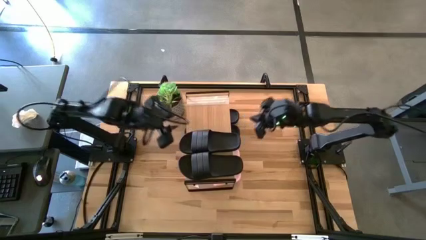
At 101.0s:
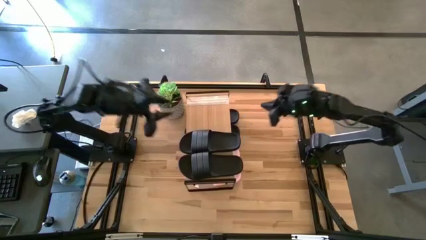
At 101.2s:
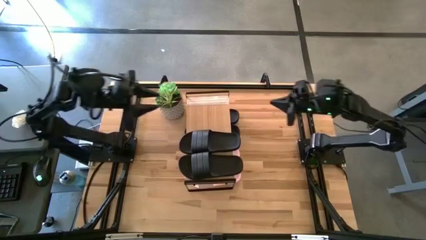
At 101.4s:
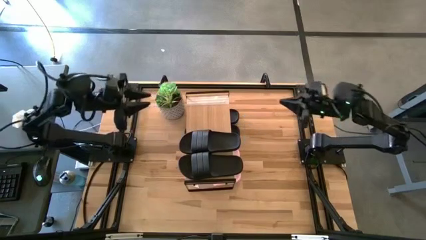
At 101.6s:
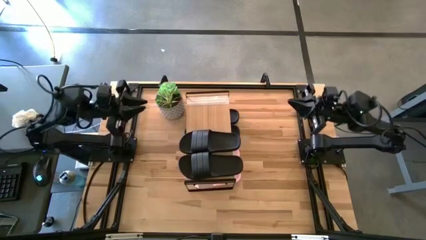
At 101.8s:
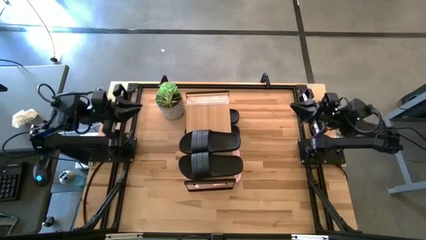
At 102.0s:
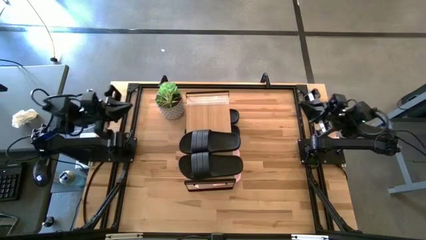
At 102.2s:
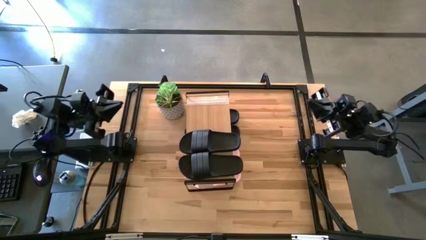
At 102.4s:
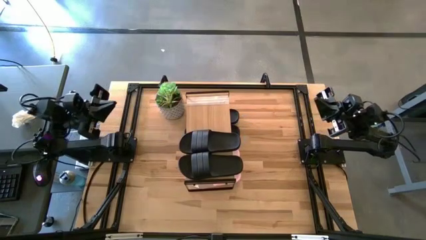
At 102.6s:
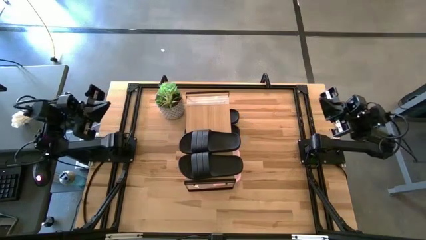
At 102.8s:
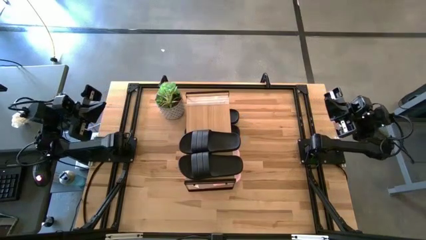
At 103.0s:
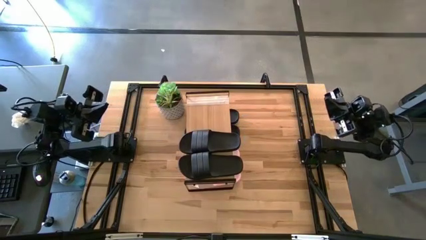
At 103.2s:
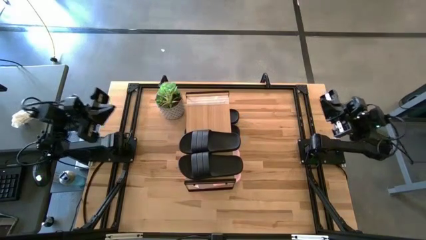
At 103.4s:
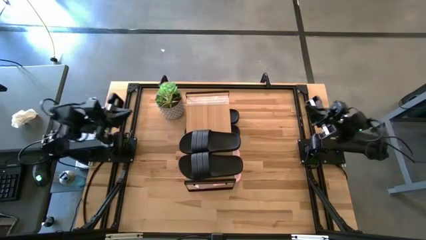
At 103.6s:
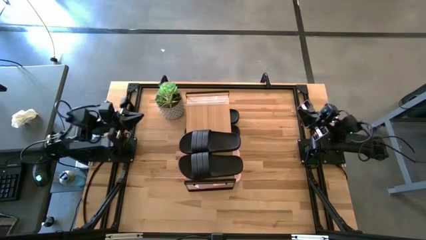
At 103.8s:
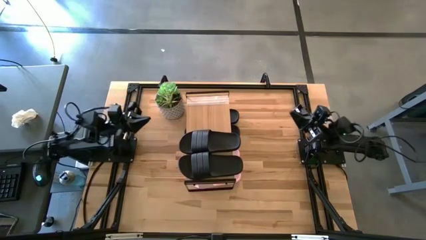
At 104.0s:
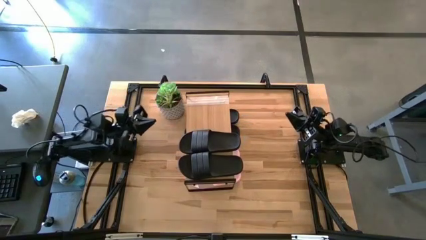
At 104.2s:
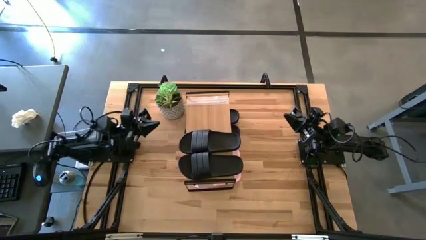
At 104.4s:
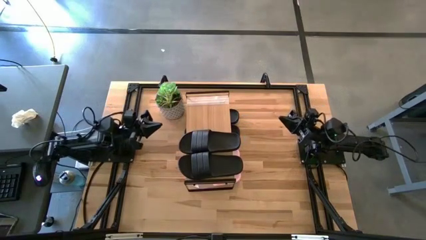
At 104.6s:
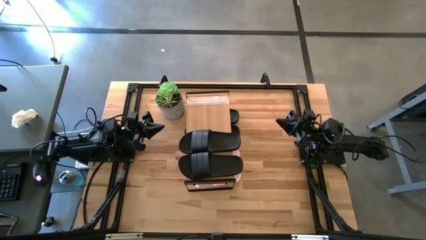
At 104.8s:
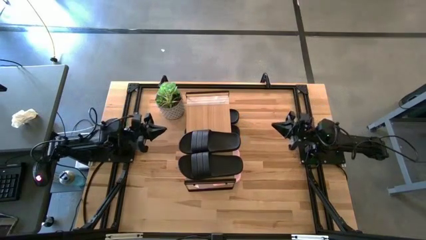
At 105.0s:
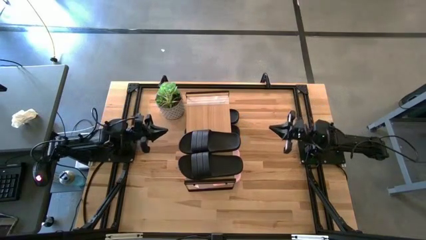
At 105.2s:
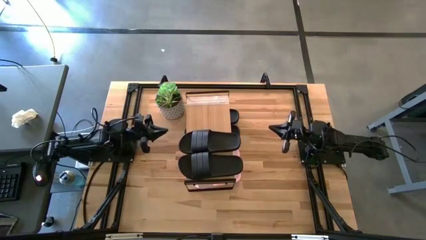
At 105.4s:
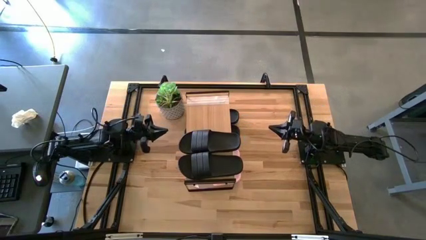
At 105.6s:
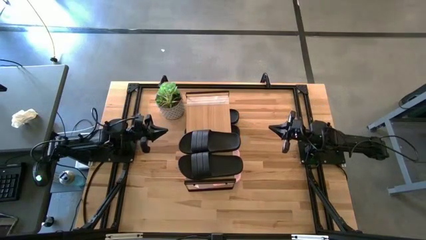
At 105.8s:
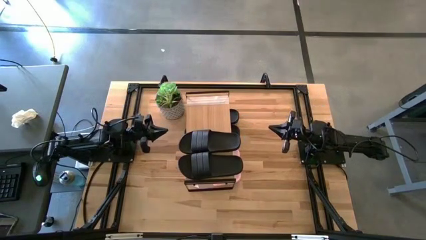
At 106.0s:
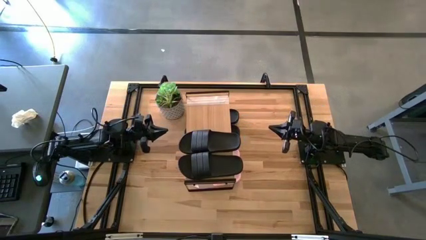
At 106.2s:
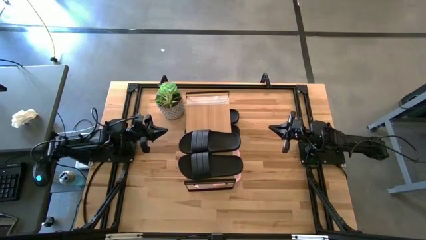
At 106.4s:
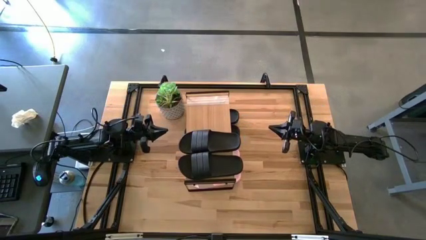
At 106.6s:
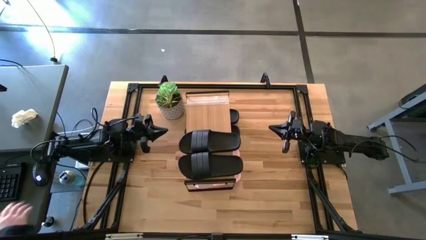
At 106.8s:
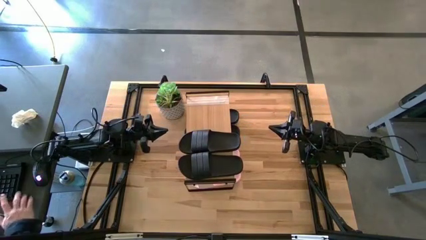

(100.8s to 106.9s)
Task: Pick and place slides into the shelf
Return to Home Position

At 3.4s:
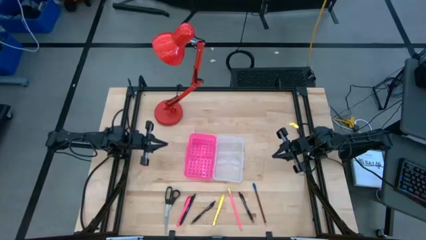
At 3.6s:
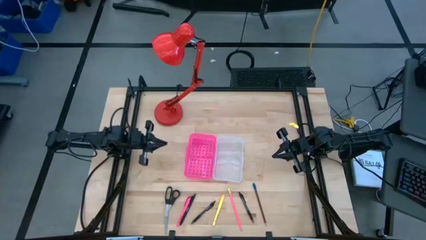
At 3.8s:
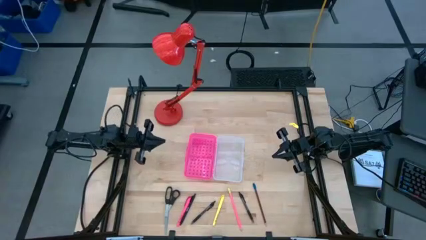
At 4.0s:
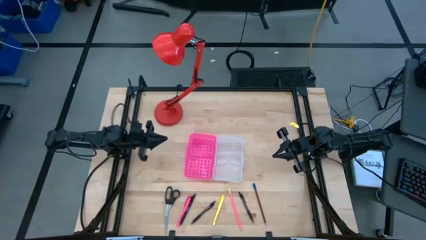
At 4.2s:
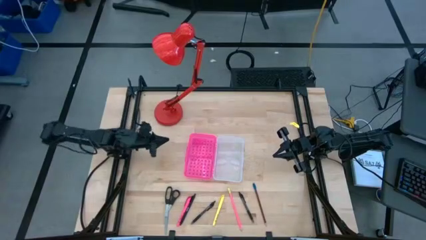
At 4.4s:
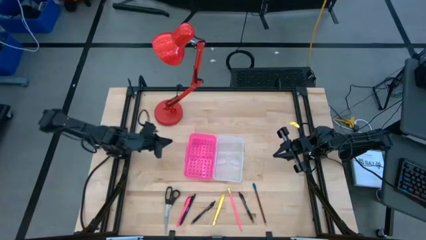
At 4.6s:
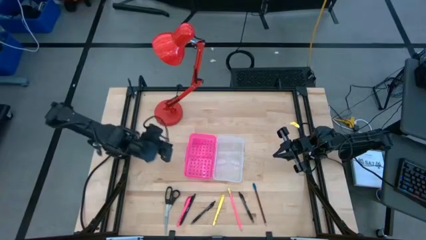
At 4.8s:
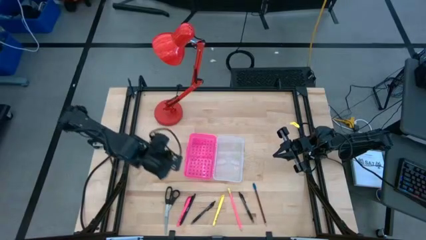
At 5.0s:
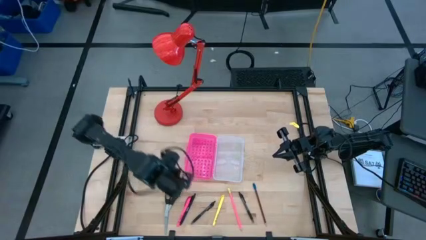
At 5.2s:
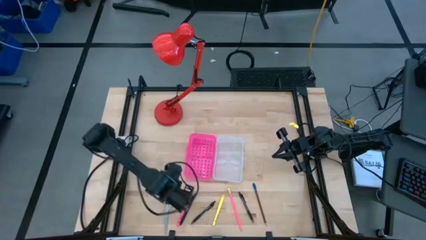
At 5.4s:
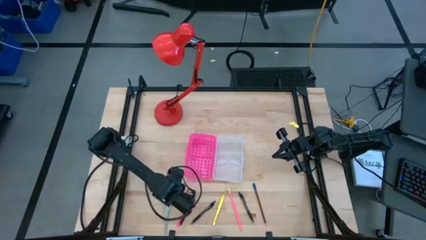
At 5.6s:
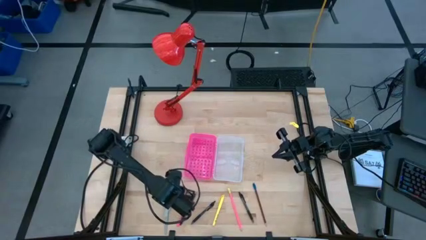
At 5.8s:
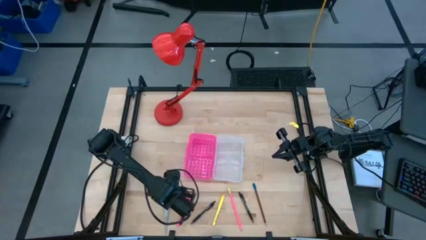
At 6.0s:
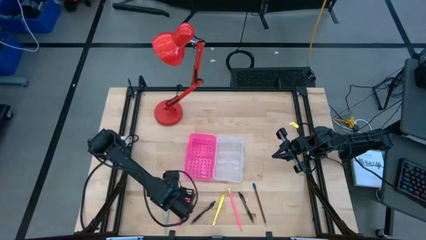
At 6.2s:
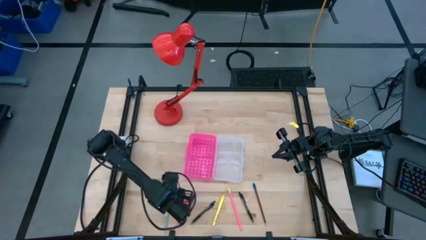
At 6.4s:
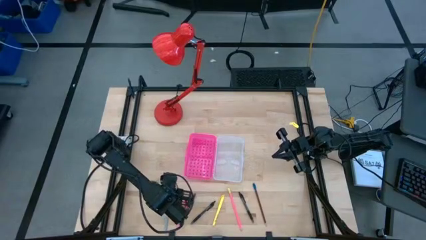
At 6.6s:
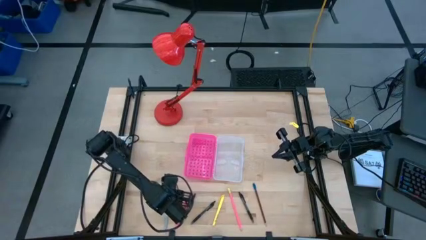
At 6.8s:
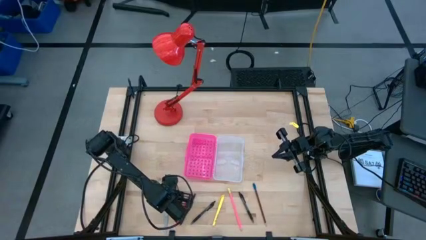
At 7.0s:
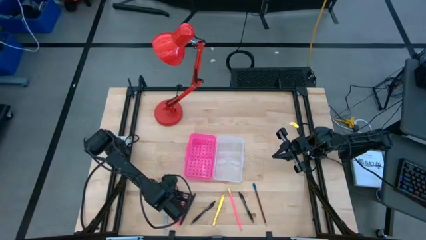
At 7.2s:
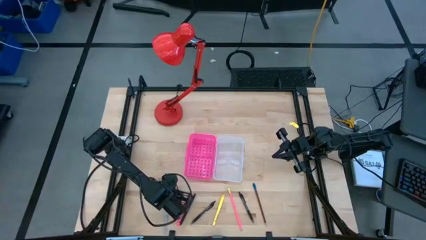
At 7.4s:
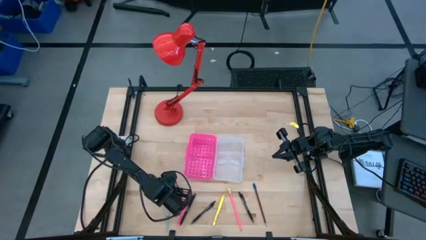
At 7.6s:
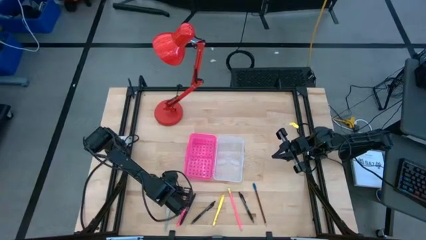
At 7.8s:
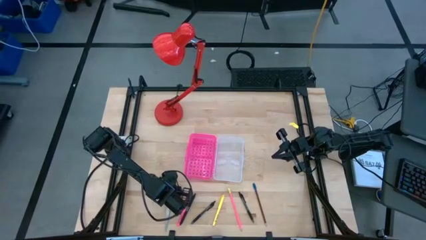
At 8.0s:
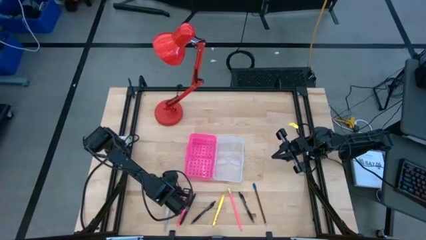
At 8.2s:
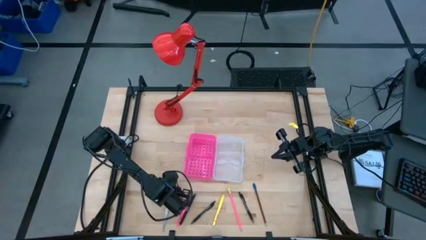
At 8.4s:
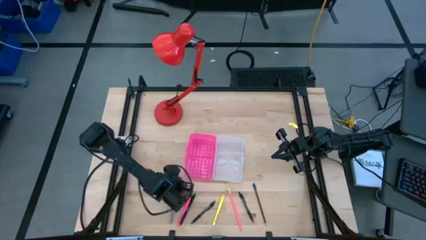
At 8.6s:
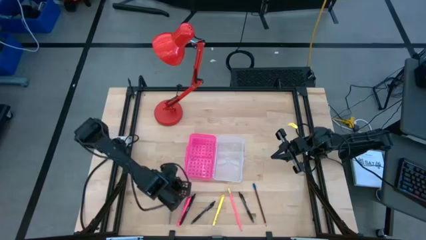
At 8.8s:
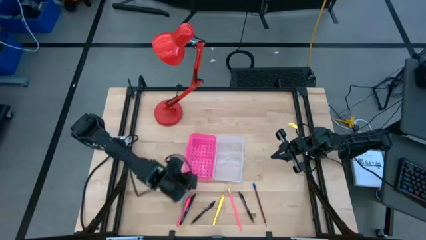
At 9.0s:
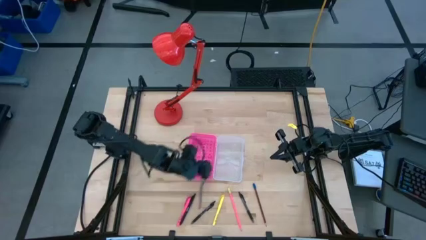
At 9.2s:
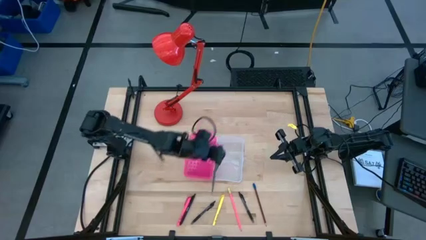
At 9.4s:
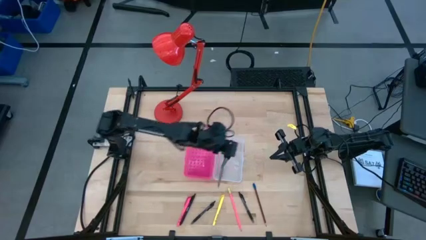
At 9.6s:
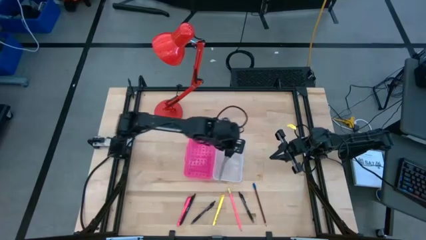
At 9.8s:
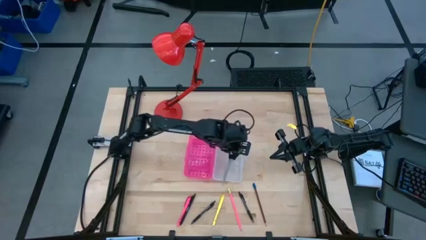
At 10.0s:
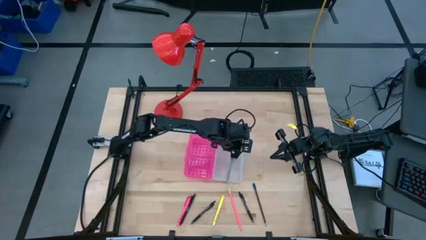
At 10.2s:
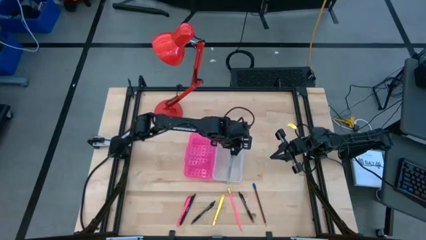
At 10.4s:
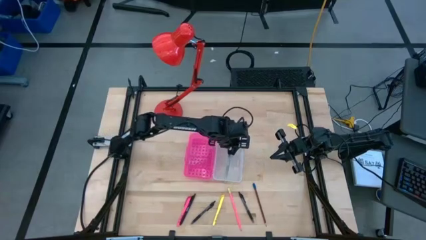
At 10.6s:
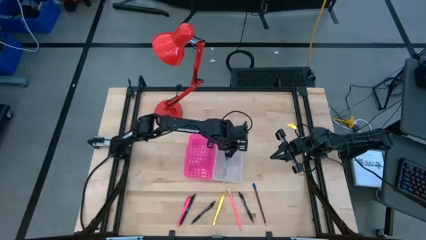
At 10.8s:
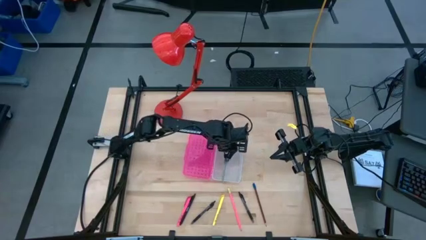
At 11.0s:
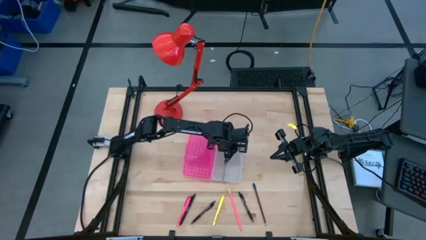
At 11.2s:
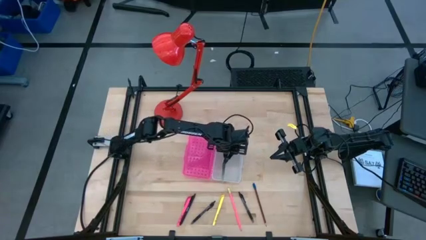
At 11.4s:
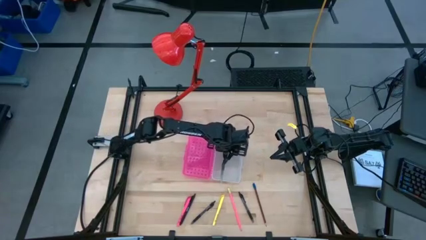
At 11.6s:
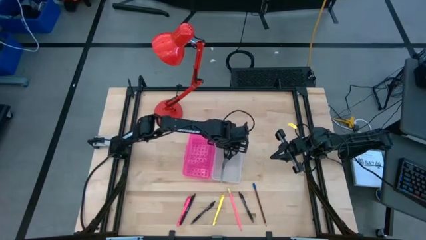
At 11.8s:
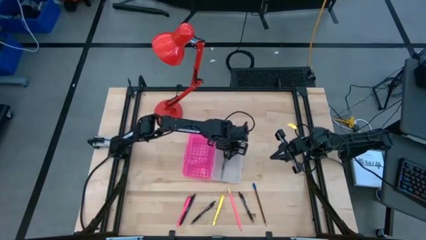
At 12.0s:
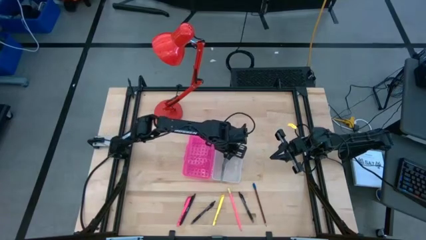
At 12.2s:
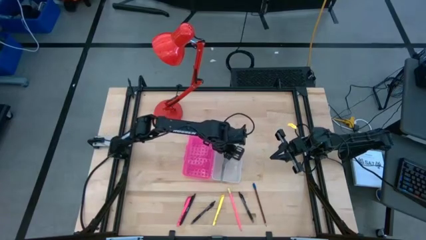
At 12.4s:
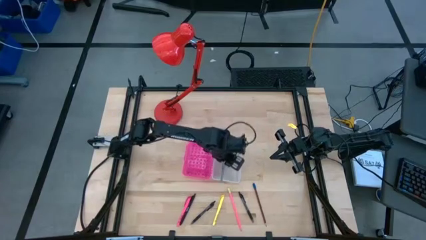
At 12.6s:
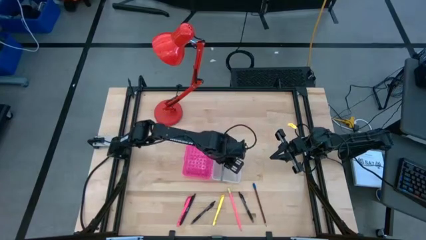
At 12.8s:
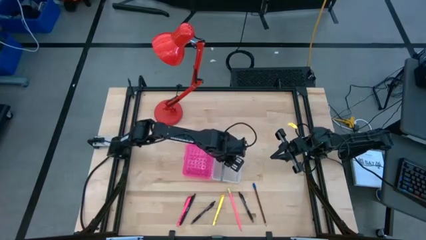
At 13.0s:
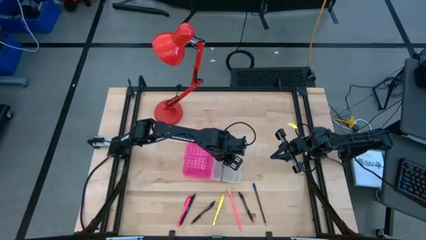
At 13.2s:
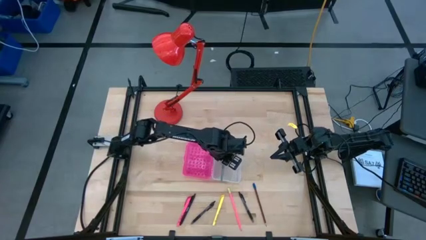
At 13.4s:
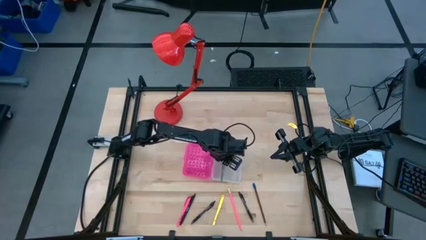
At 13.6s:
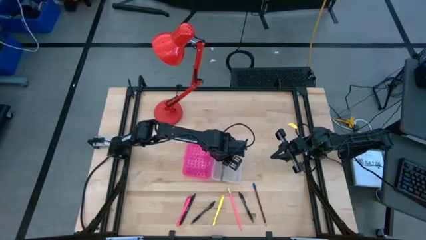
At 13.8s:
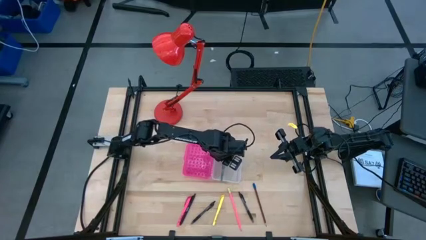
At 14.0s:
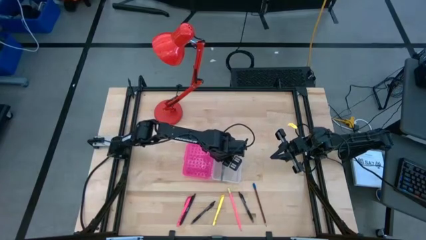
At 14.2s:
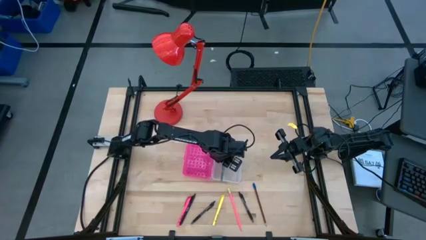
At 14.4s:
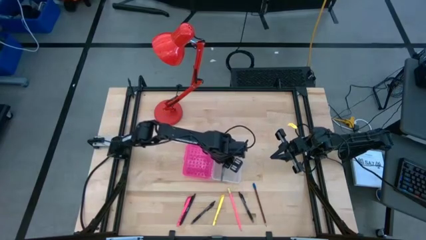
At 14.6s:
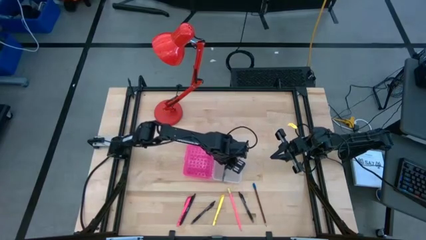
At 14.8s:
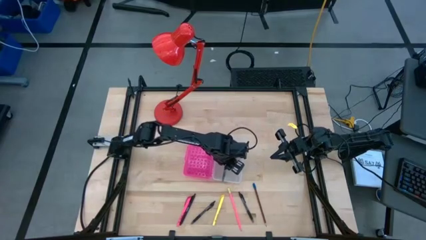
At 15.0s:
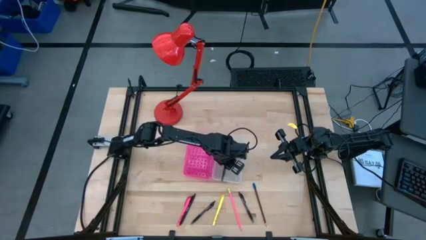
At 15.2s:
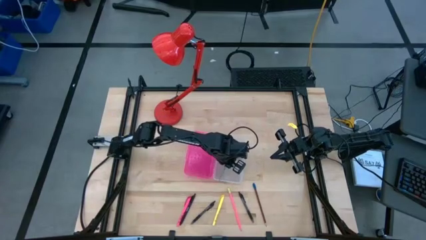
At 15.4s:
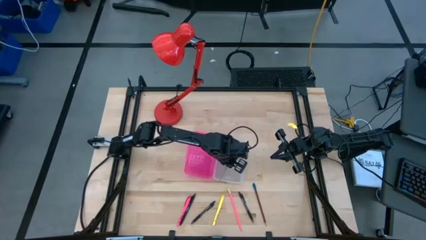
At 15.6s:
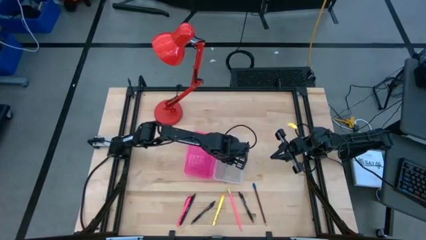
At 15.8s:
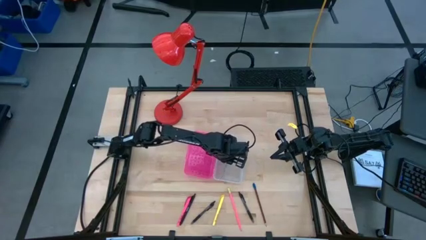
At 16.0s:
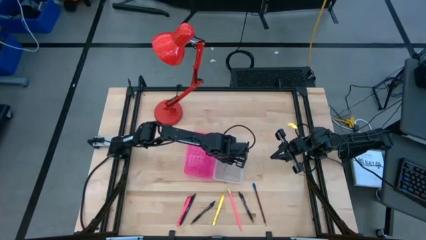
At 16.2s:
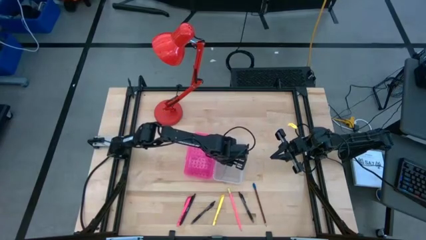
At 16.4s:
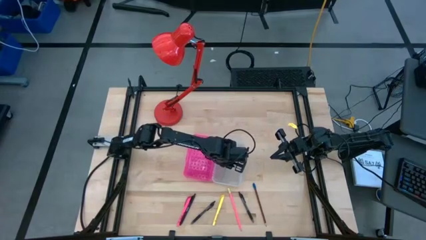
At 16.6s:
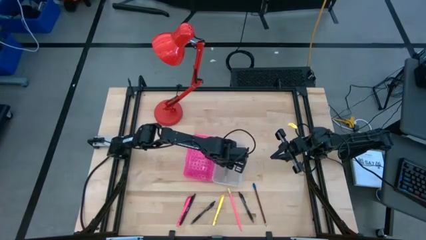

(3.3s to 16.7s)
Task: Pick & place school supplies into a supply box
Put the black scissors in the pink box
